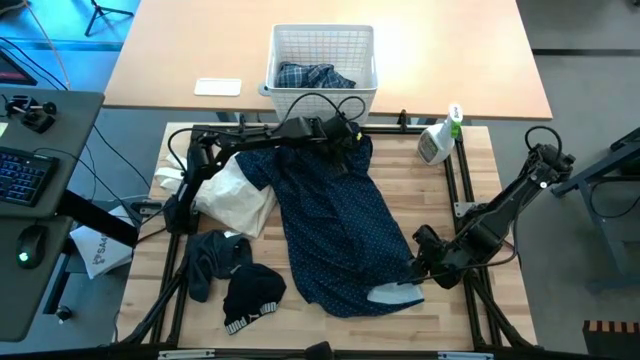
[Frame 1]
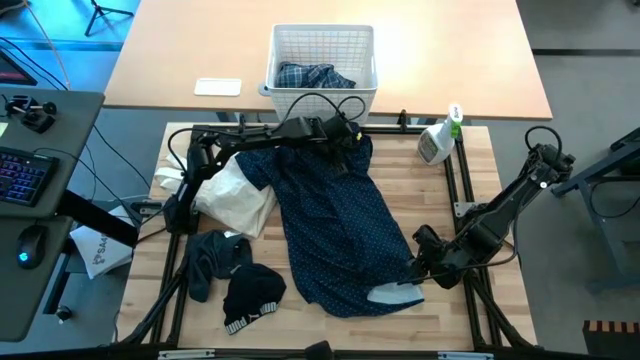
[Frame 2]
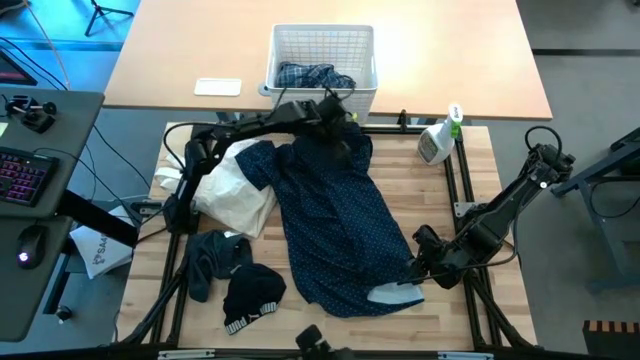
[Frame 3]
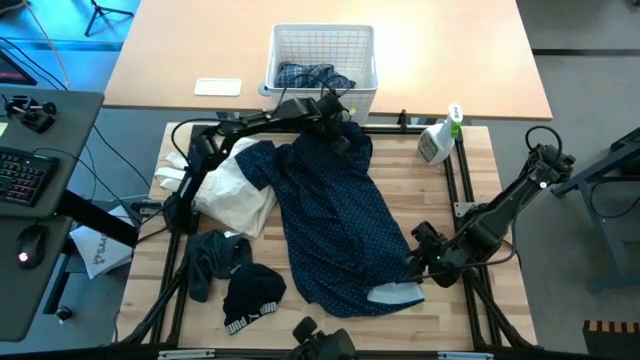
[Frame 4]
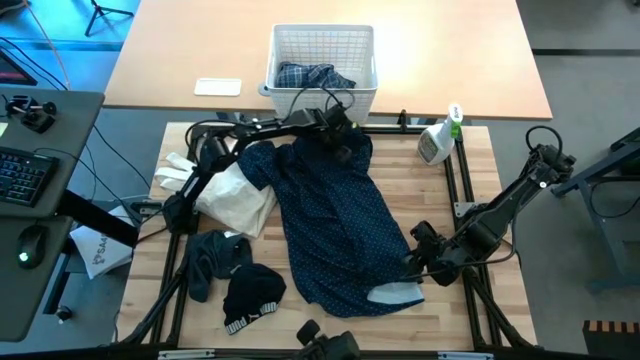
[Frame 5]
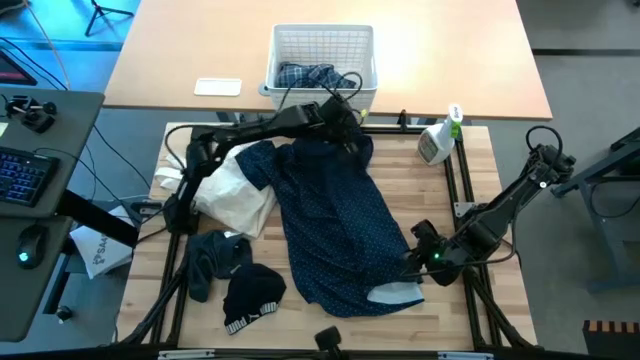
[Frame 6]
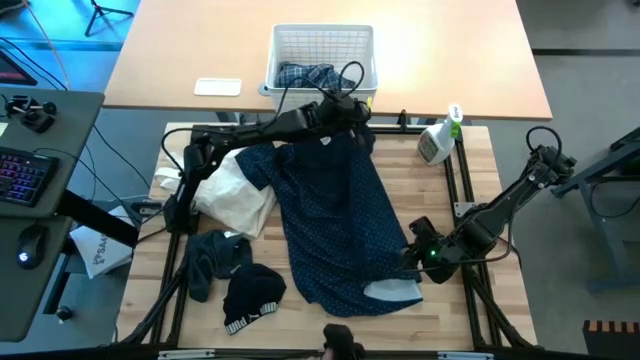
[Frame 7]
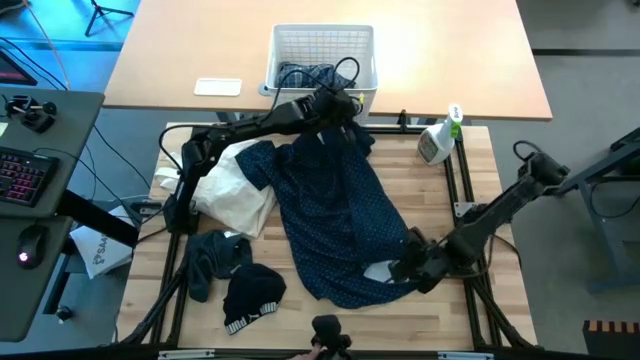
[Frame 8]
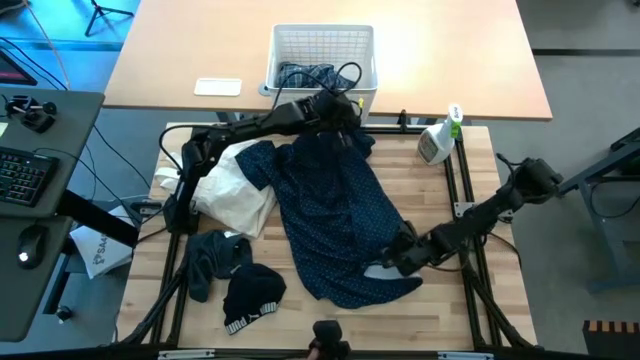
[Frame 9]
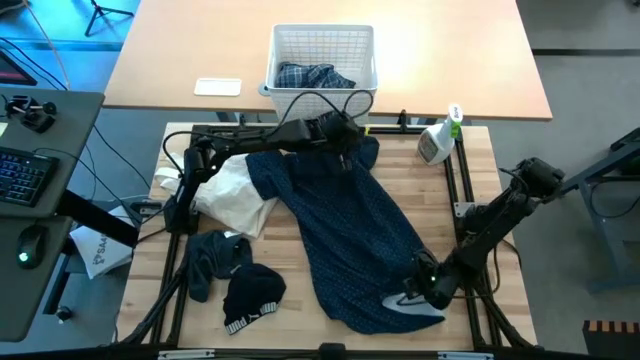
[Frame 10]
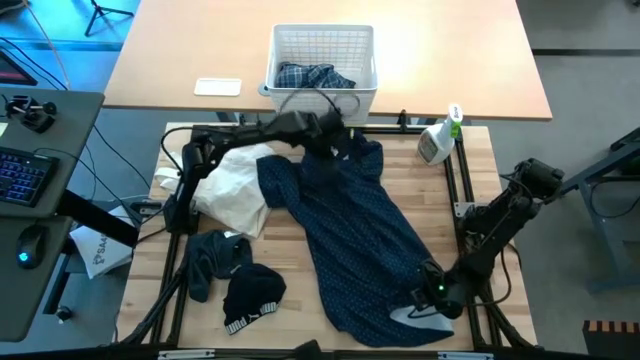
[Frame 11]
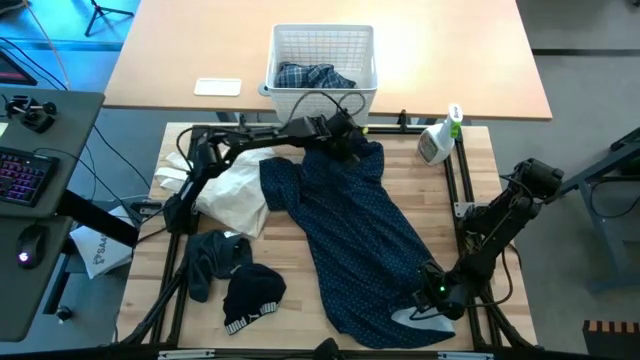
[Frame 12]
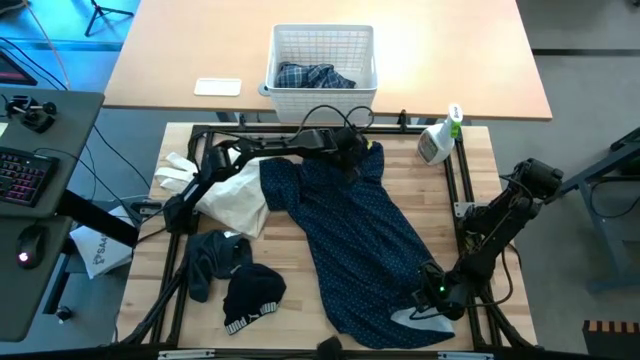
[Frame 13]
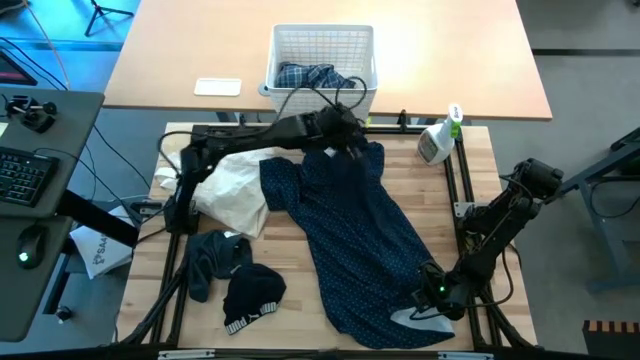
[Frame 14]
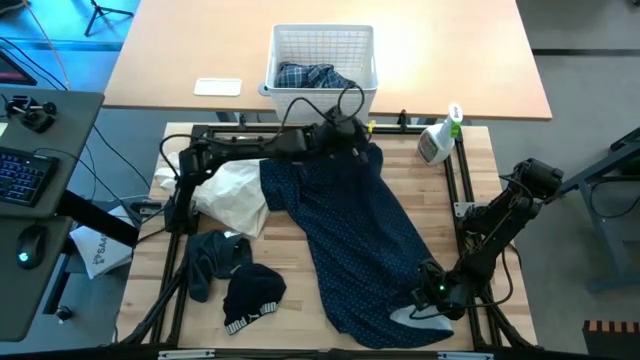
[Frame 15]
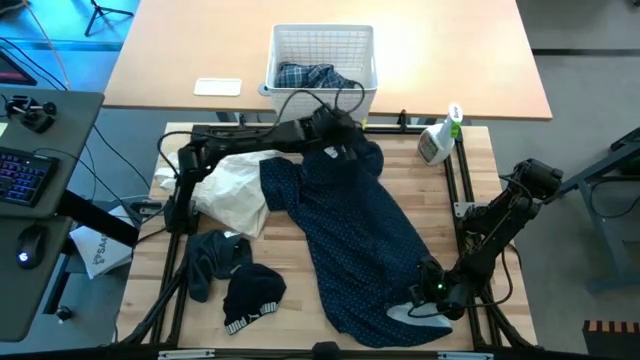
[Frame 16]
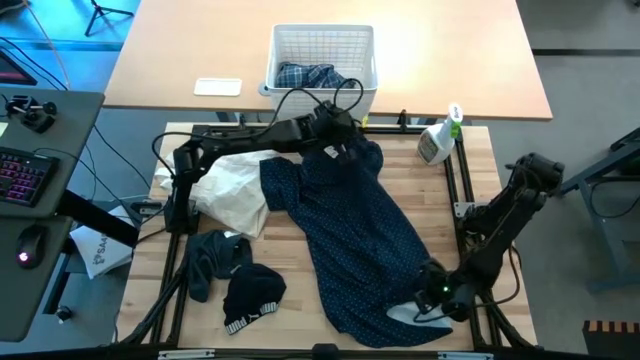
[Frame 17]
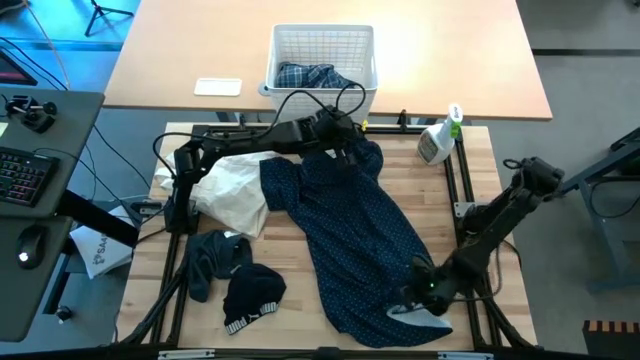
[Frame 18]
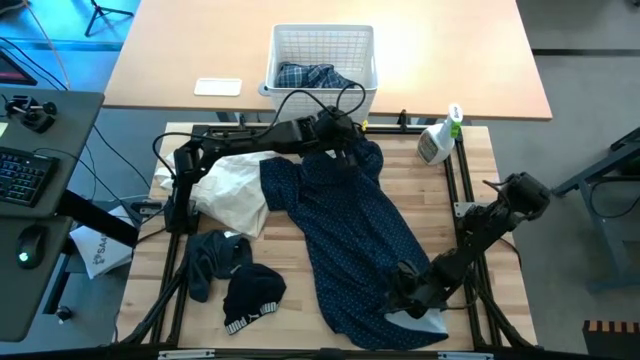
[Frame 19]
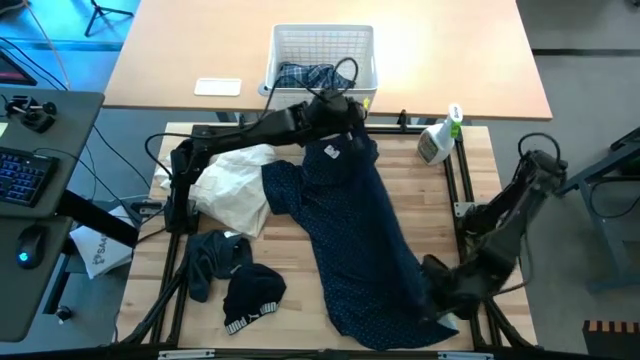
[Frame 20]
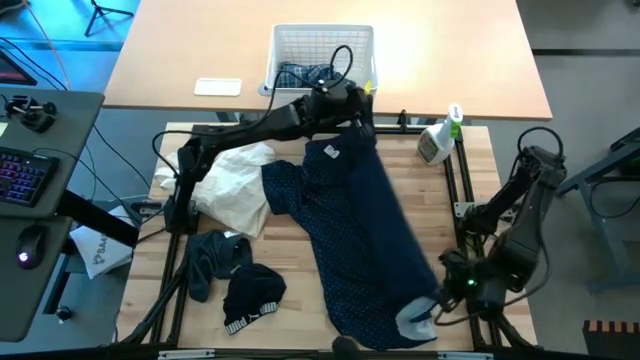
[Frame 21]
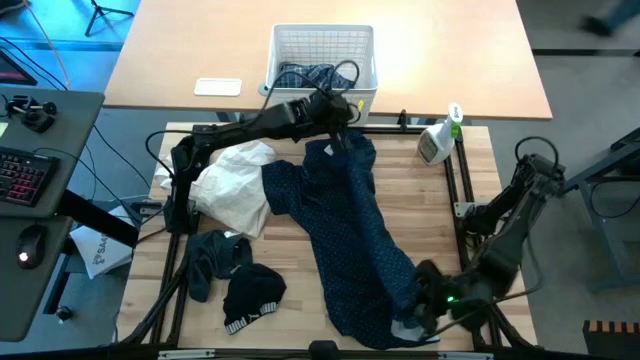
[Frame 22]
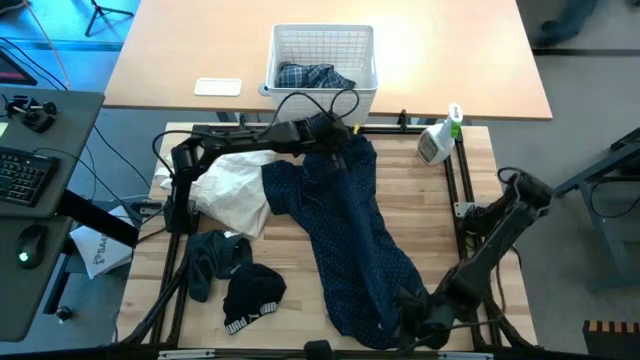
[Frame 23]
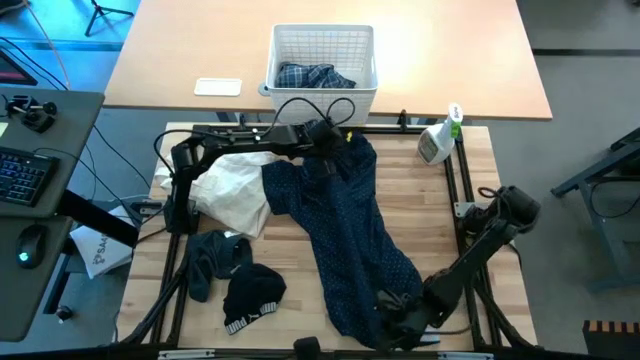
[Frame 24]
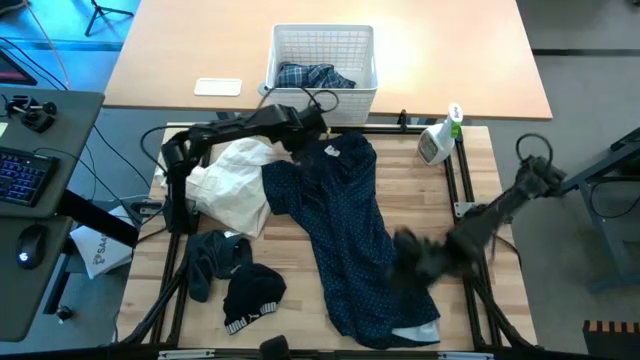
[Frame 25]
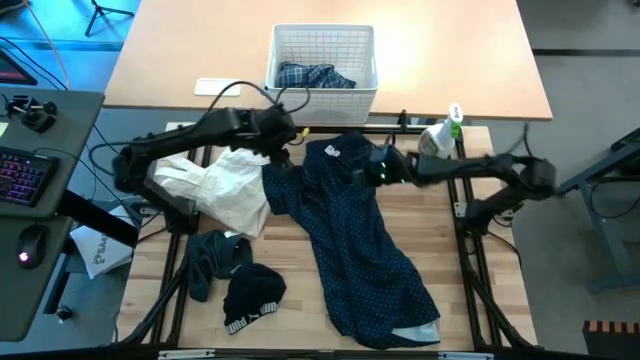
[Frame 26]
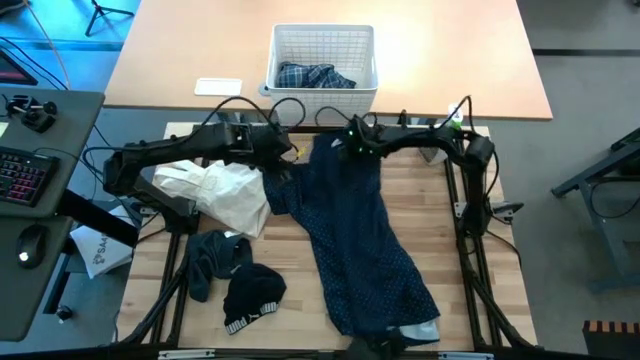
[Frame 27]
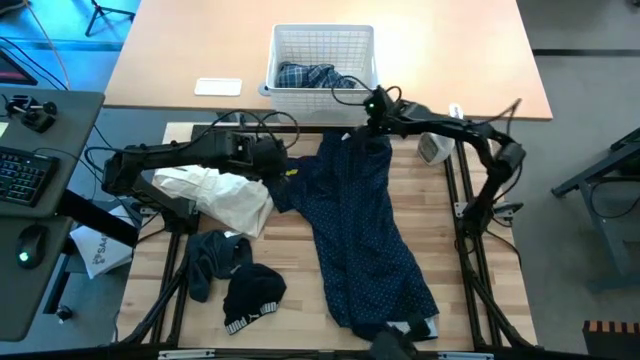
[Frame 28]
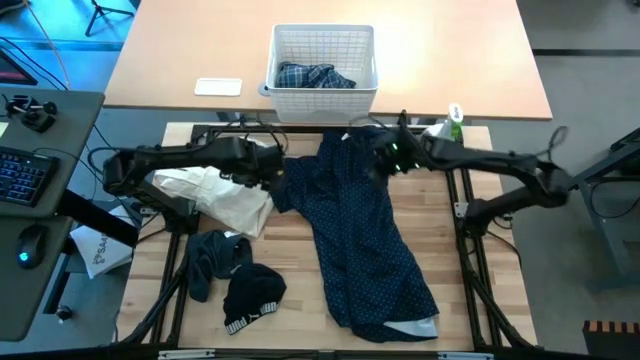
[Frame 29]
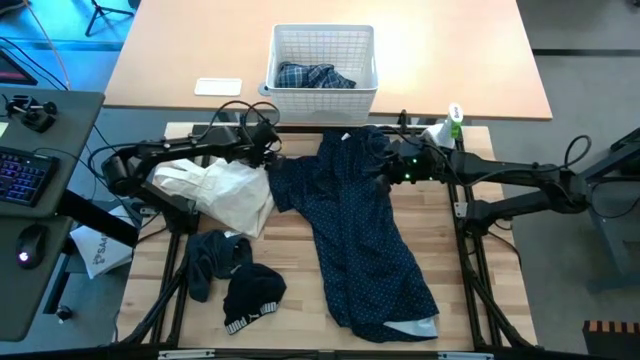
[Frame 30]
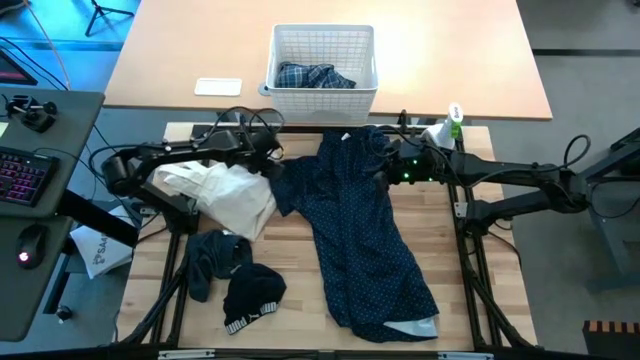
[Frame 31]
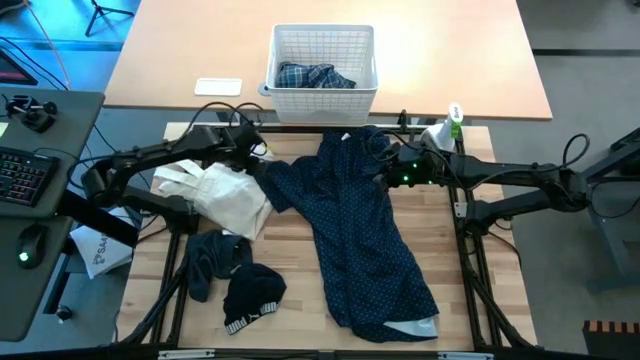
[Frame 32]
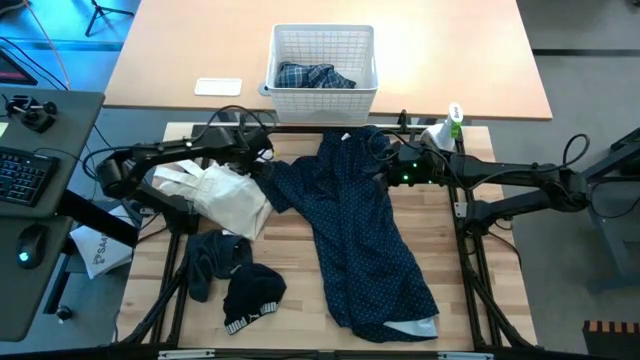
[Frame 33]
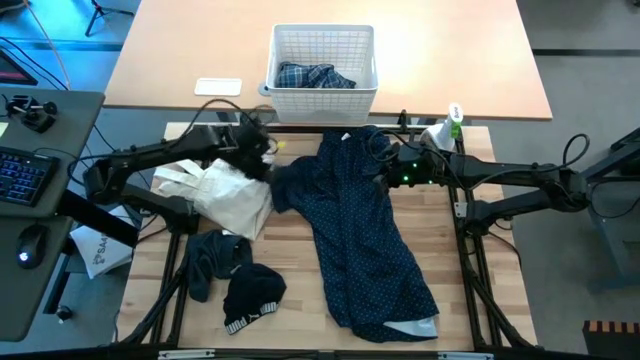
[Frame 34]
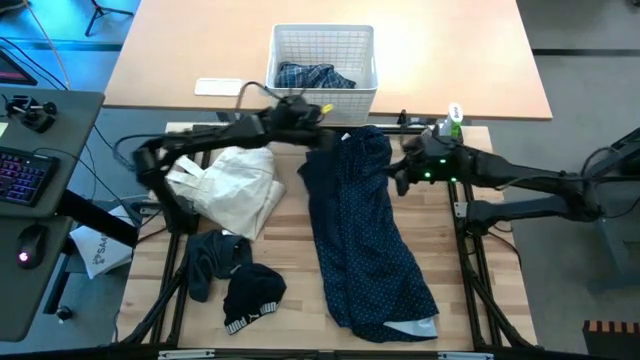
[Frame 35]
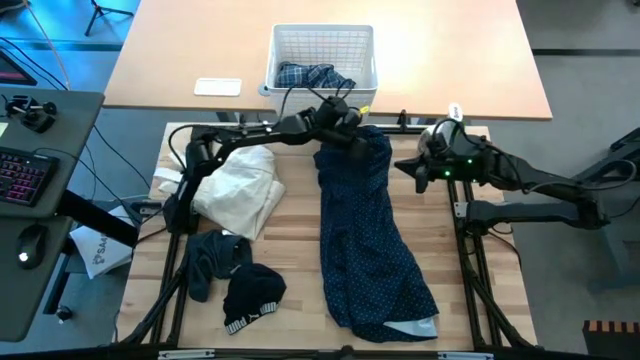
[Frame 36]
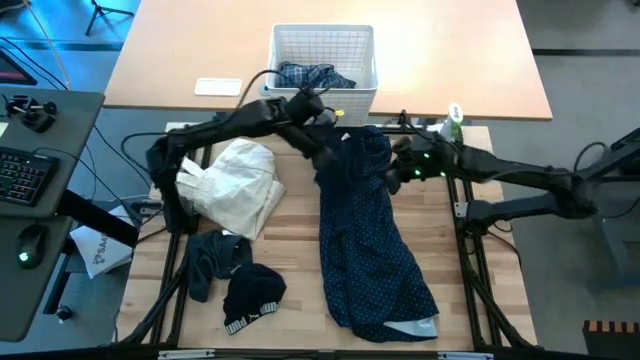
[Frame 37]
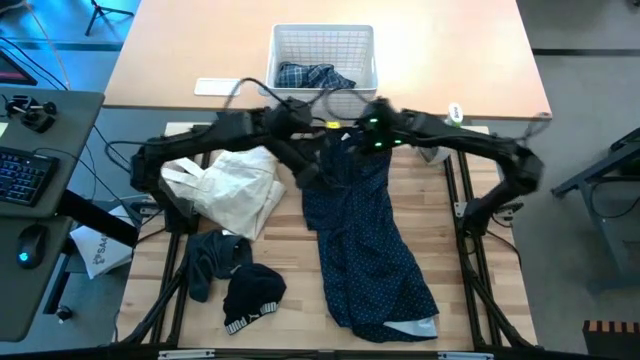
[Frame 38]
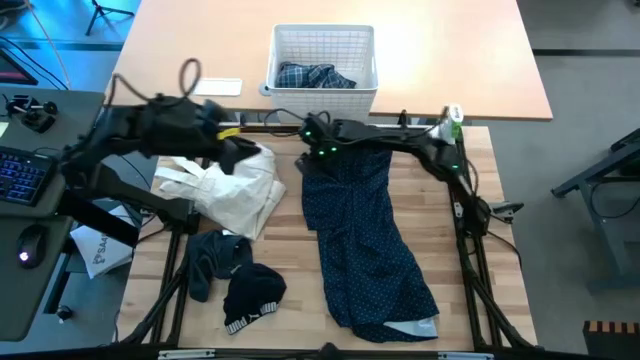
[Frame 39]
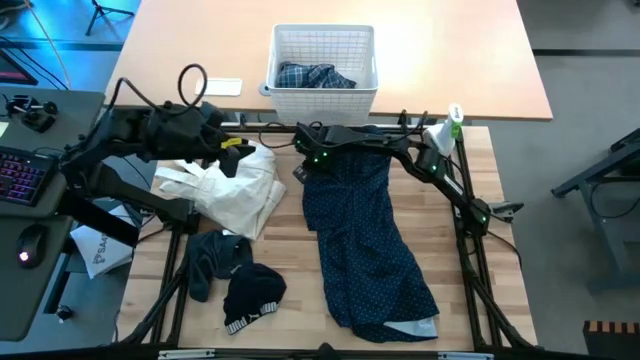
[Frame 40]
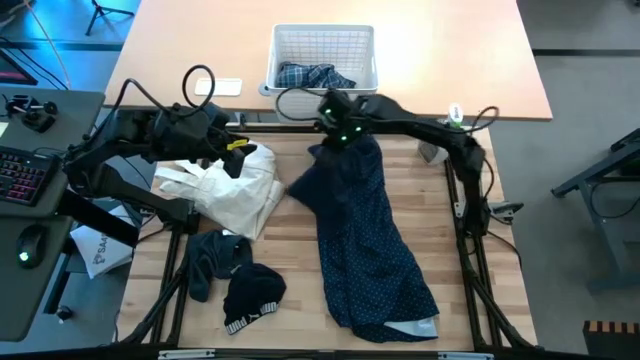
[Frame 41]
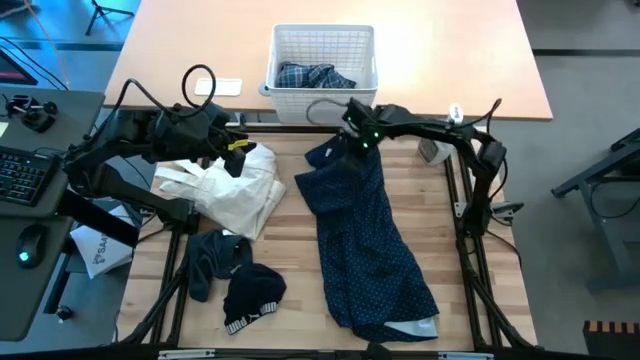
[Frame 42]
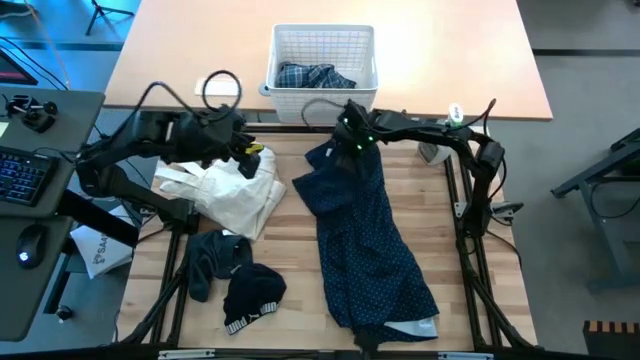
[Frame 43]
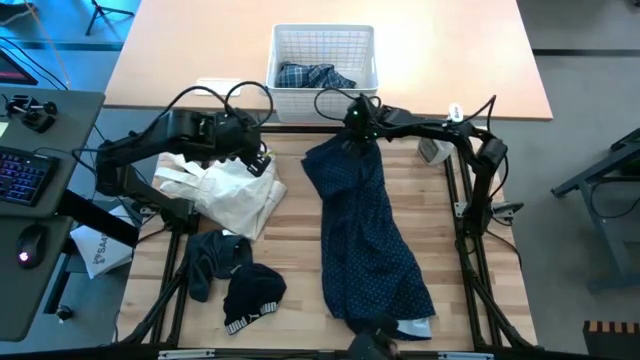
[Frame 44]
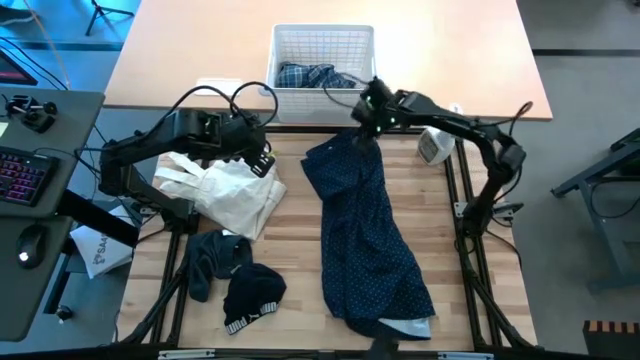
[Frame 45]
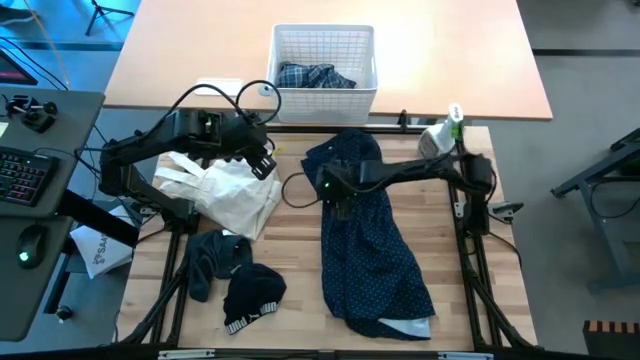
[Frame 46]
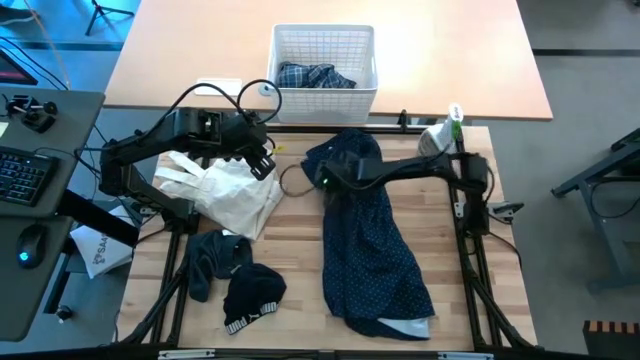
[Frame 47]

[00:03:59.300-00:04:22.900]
Task: Fold laundry
Fold the navy blue polo shirt
